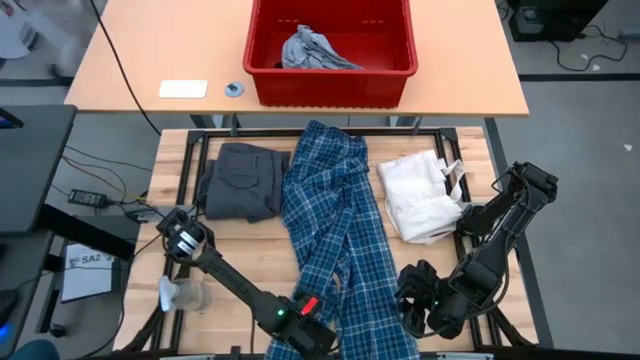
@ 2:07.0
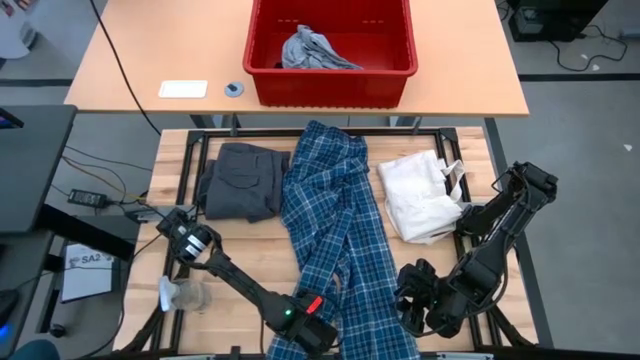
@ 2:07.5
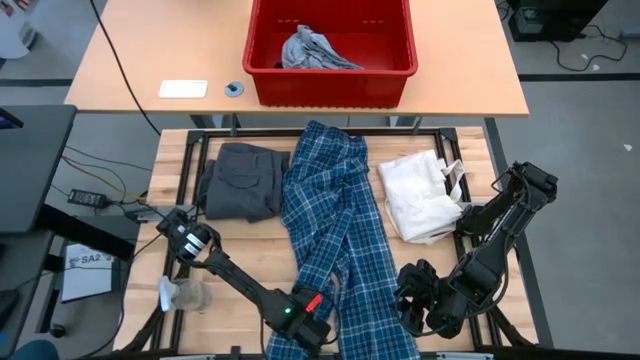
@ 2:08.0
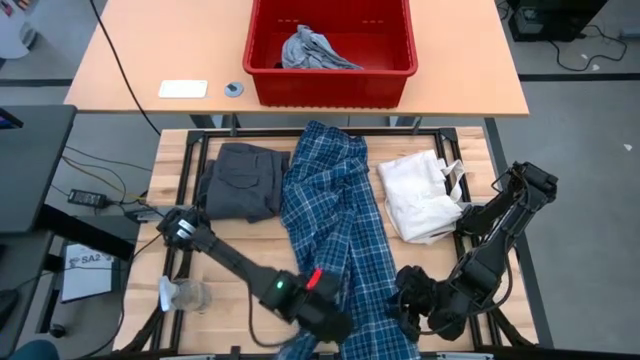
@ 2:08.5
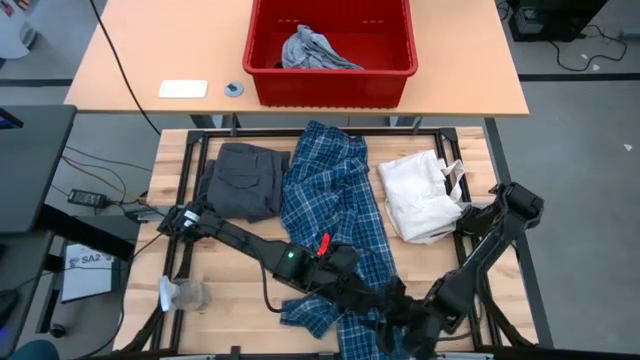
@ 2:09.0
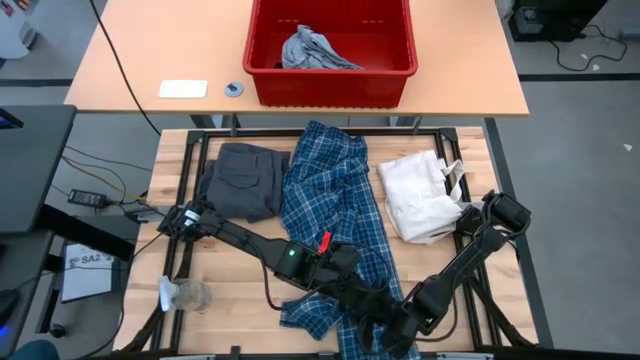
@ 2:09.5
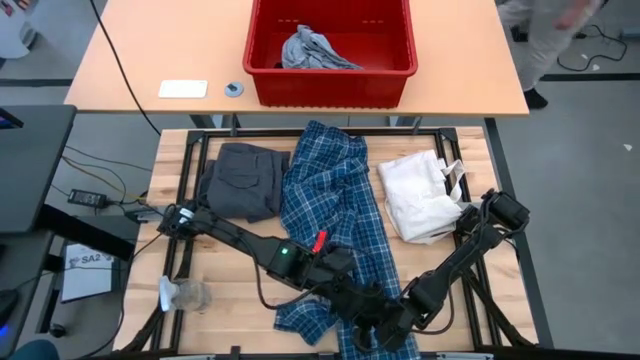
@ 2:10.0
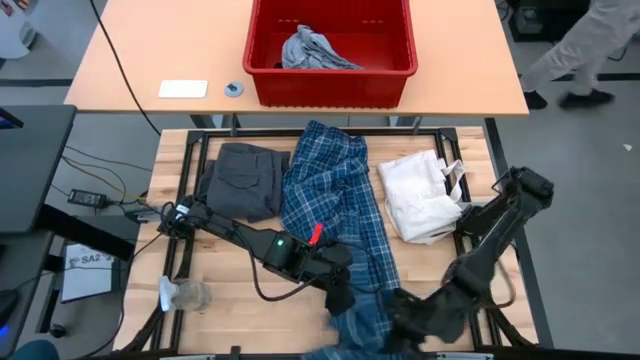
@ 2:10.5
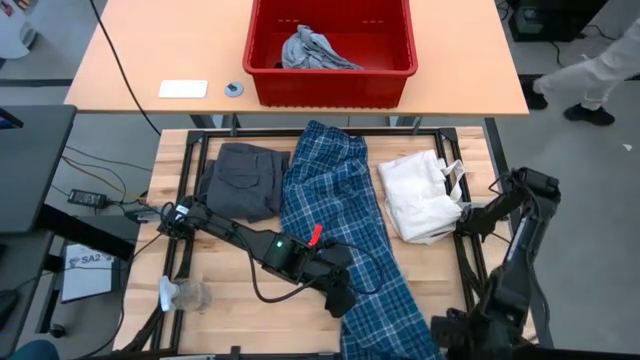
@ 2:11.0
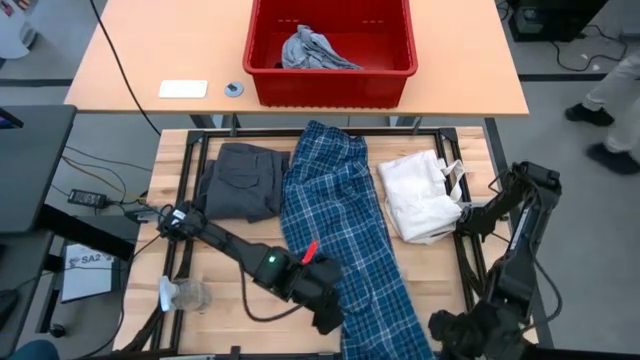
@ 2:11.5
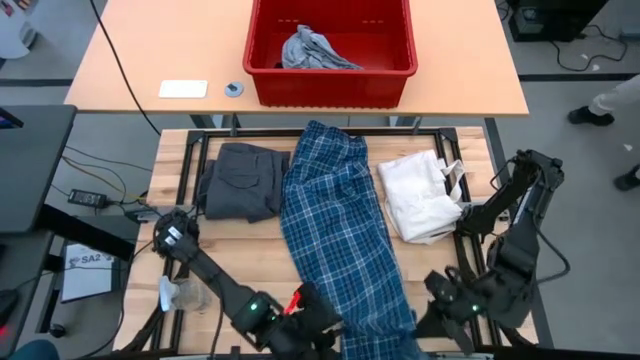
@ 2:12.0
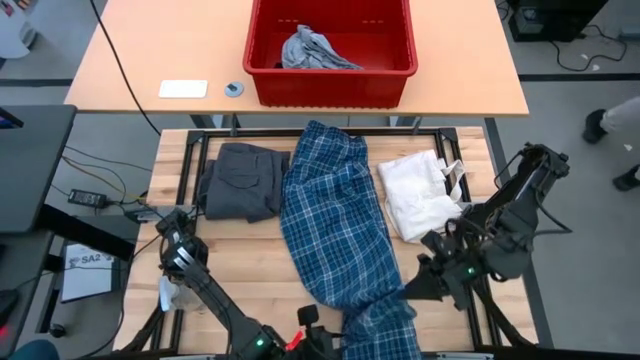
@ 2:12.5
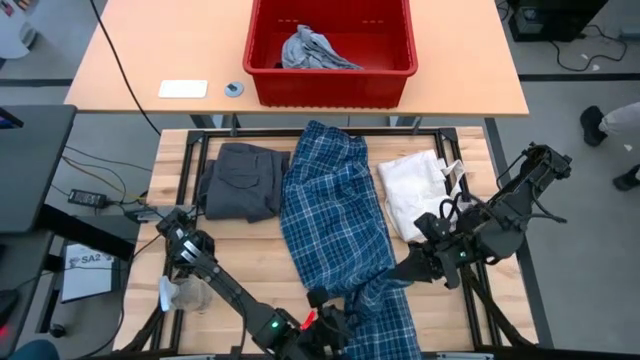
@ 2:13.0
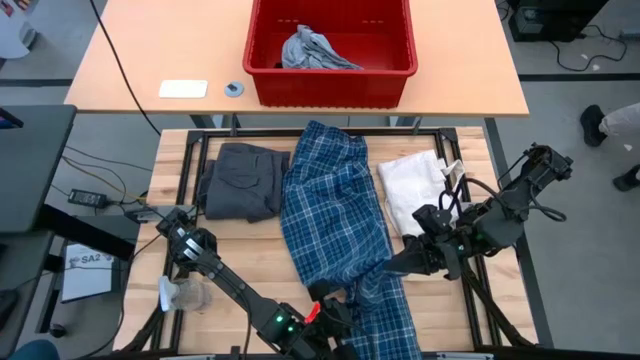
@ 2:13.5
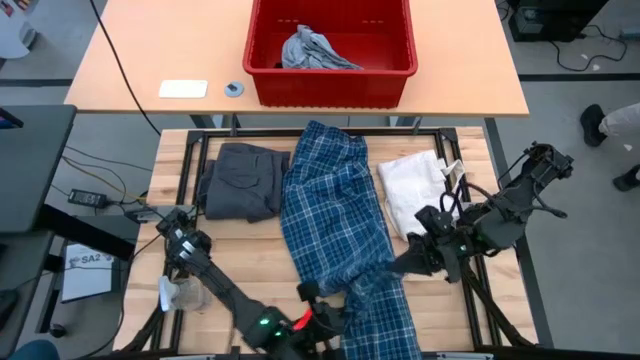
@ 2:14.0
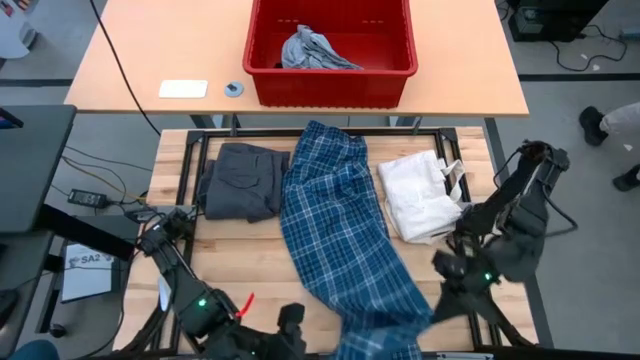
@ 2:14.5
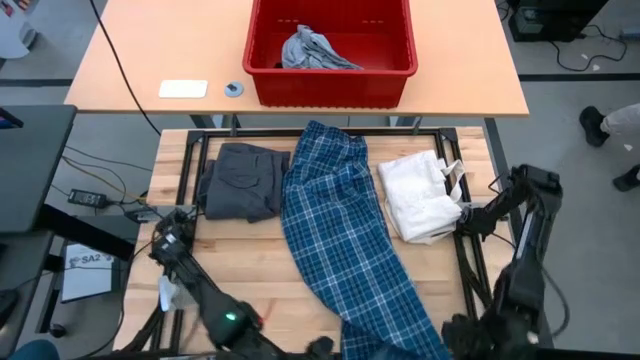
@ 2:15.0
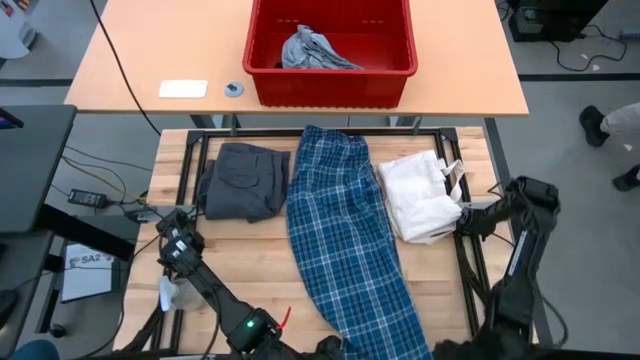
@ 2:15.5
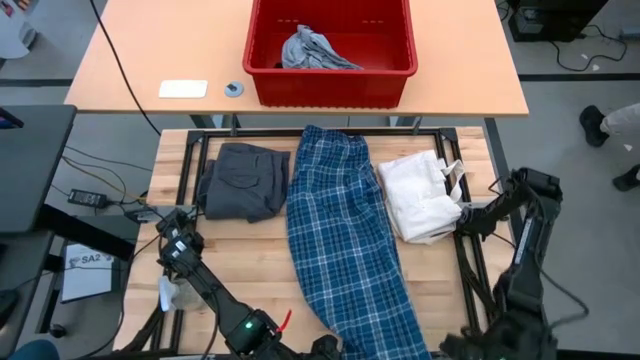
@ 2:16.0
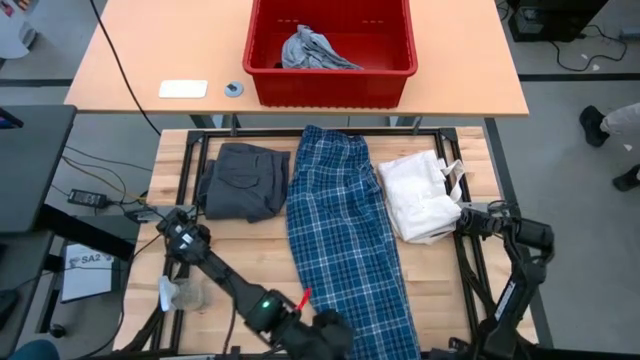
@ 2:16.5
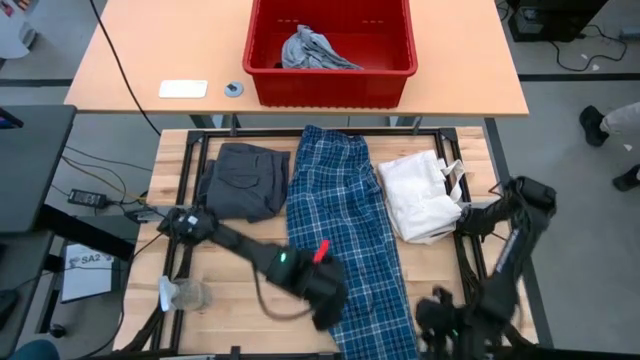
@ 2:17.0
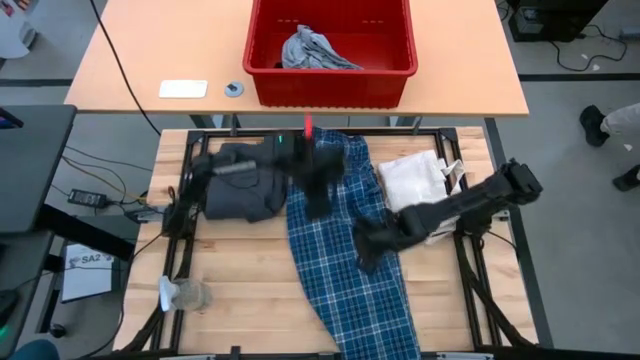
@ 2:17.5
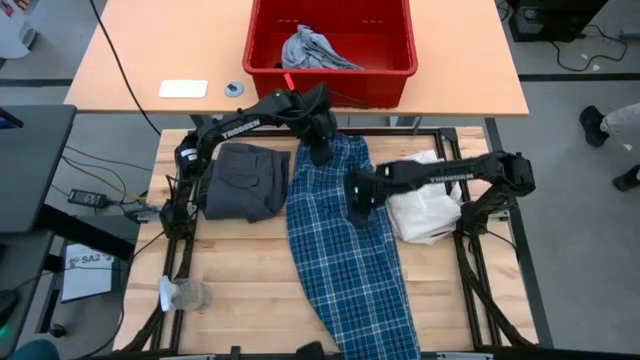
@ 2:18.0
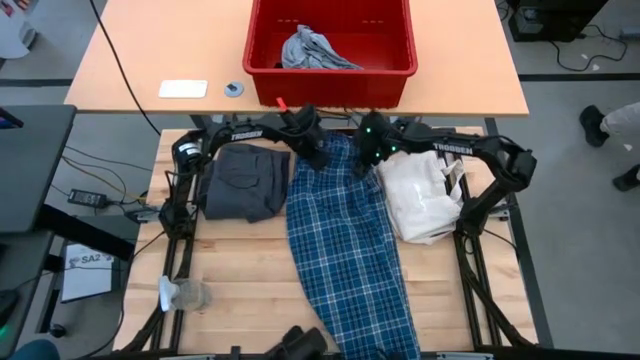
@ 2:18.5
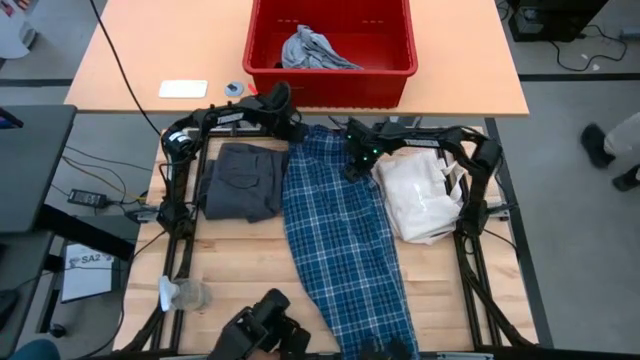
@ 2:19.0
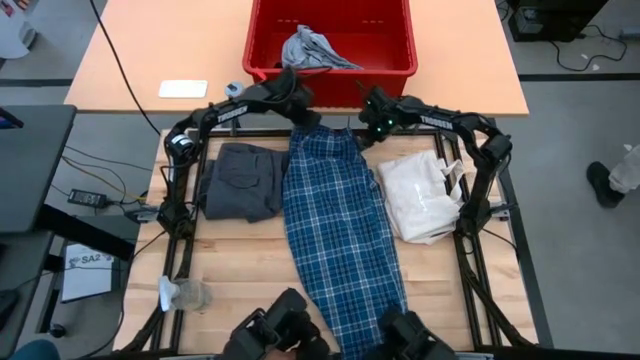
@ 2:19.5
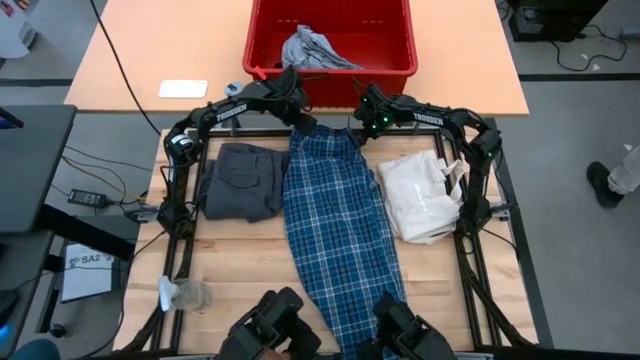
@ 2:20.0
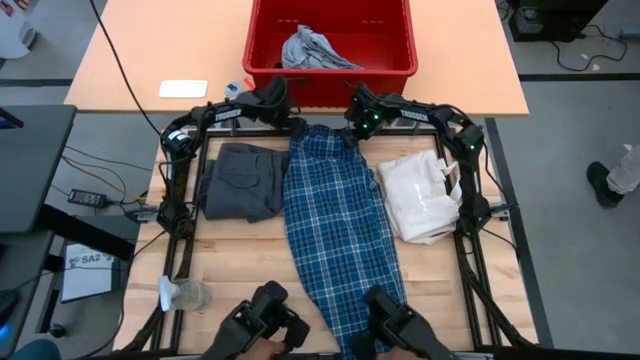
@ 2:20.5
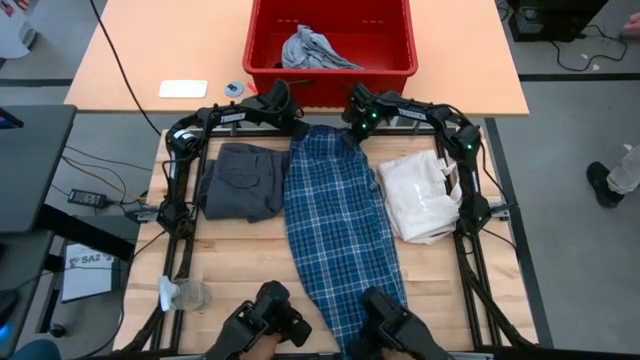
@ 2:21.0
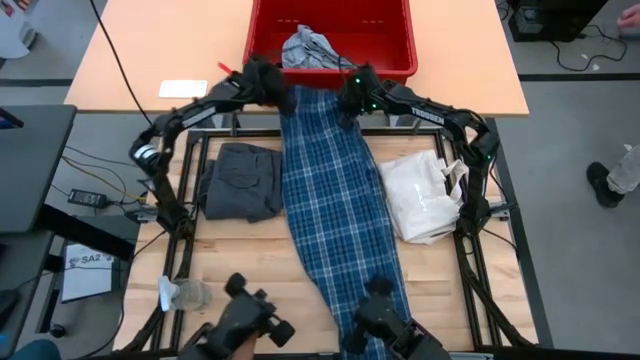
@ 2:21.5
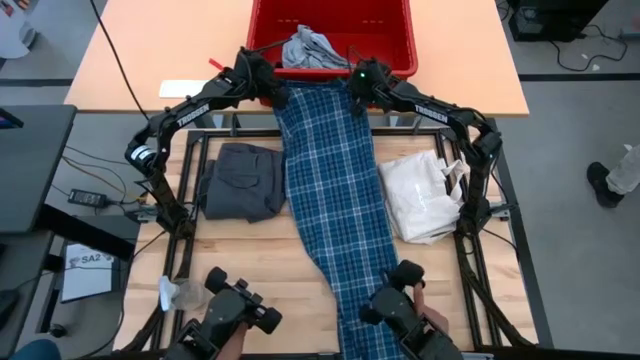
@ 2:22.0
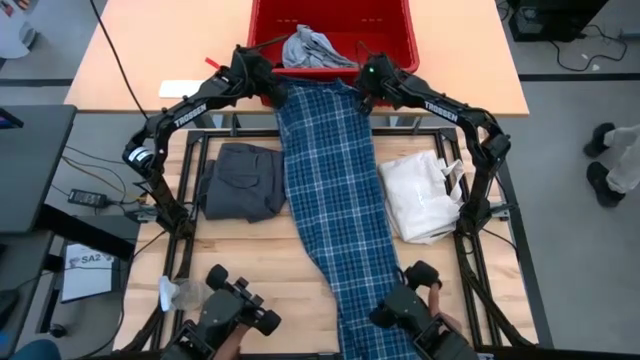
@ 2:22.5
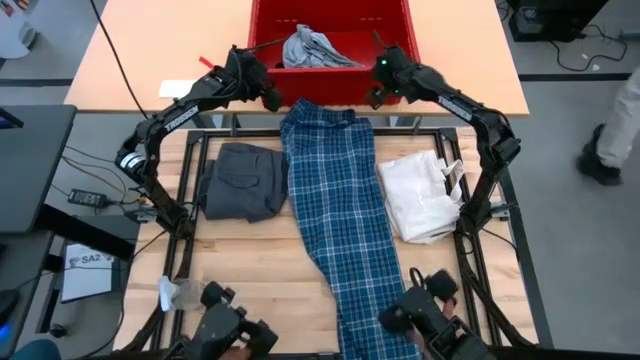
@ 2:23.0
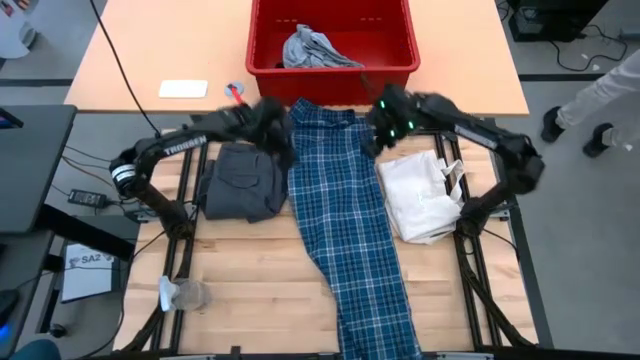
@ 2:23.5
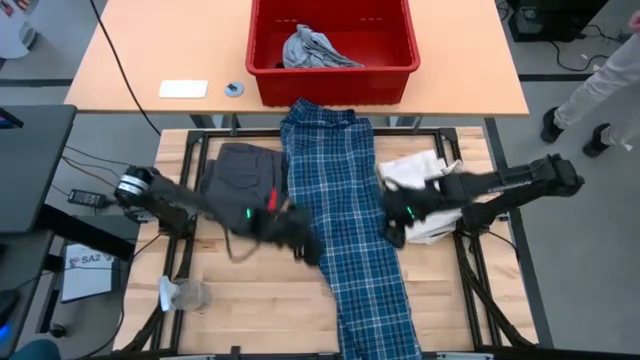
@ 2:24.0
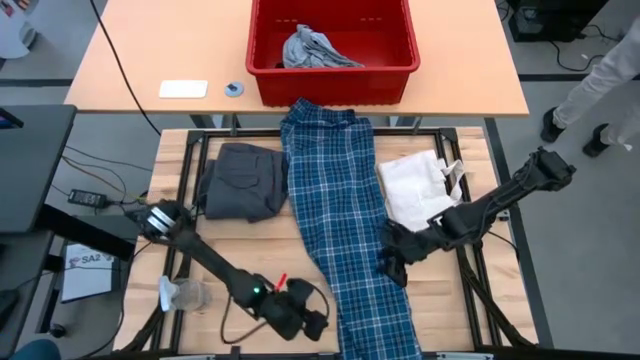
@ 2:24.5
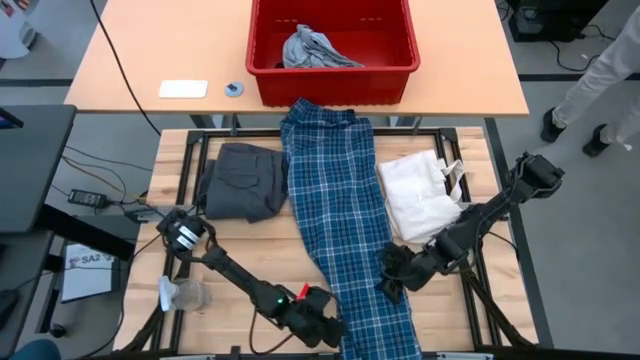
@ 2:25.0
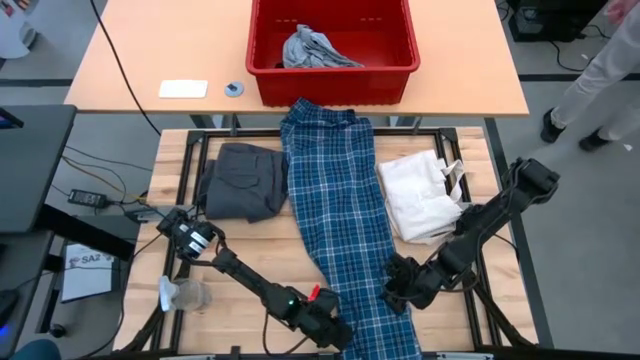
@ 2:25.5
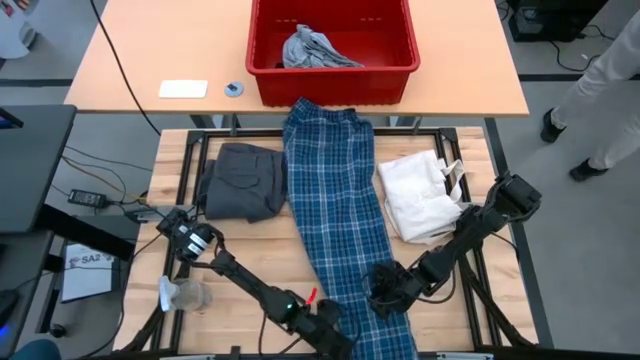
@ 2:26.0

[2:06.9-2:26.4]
Task: Fold Laundry from Bin
Fold the plaid pants

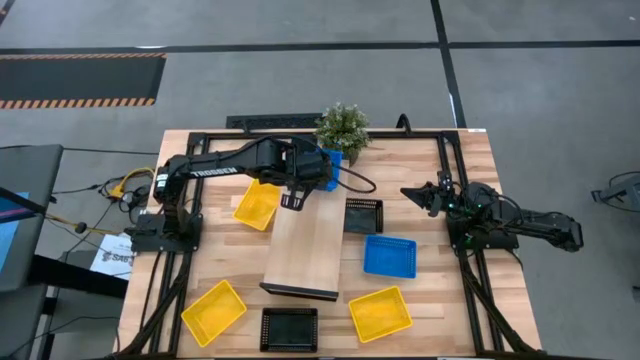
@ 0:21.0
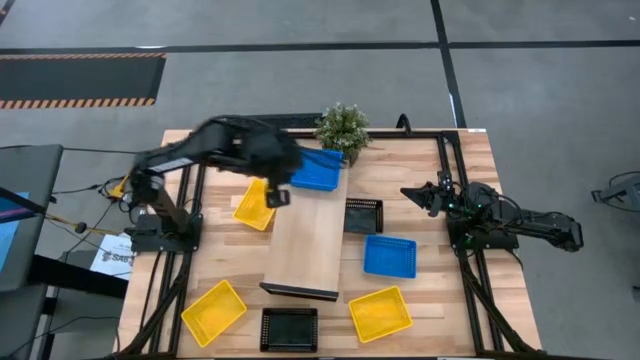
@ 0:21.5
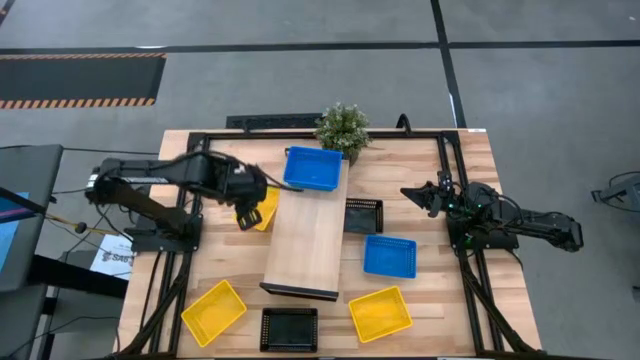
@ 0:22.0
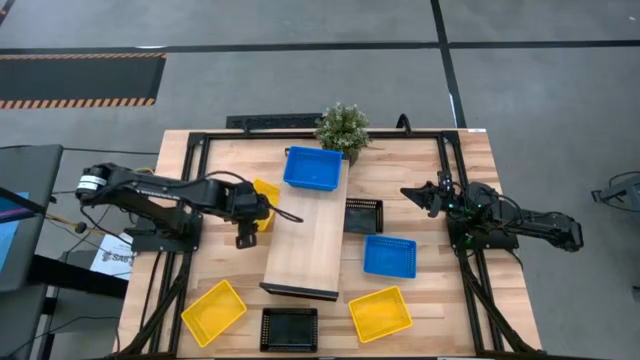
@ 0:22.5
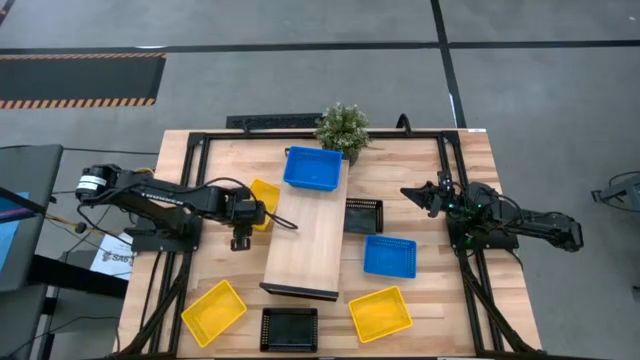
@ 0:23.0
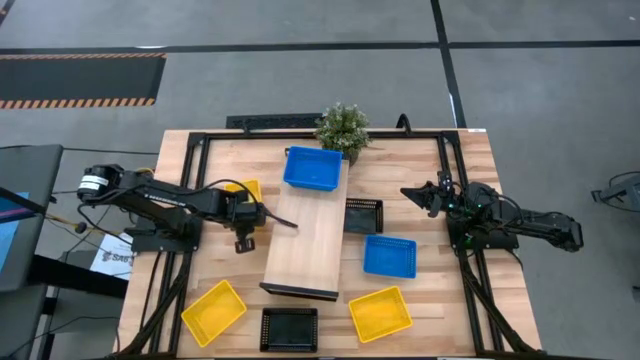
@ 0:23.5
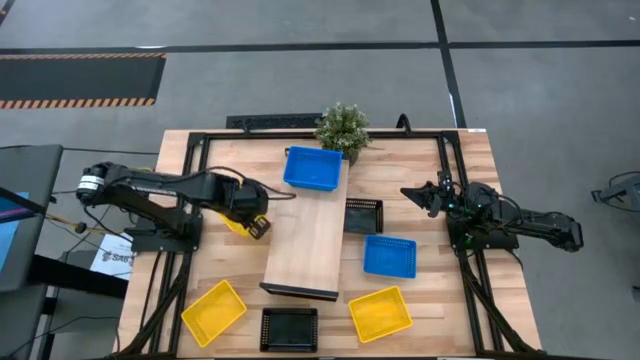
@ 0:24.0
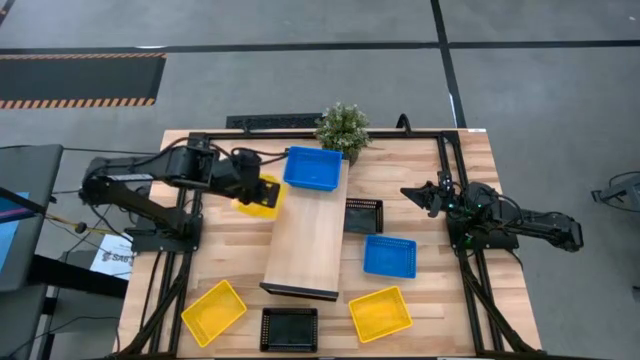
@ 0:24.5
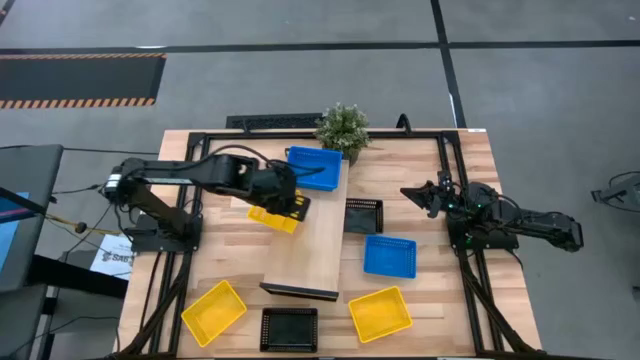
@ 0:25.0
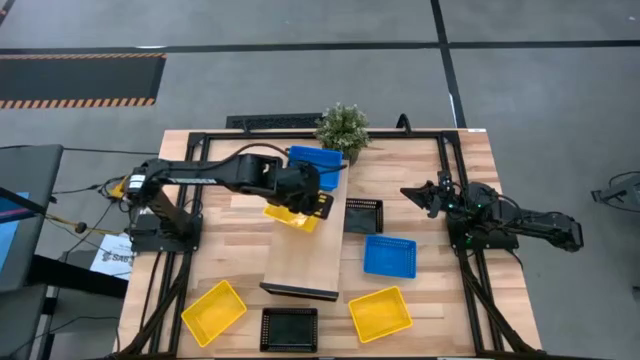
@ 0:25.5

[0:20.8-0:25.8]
Task: Stack baskets on shelf by color
Put the top left yellow basket on the shelf
